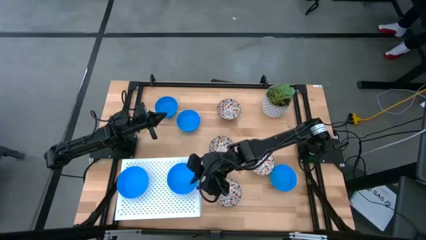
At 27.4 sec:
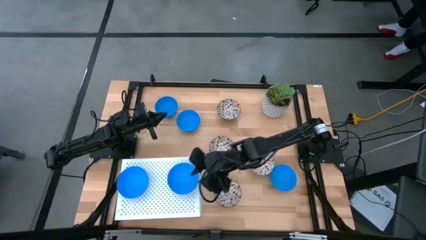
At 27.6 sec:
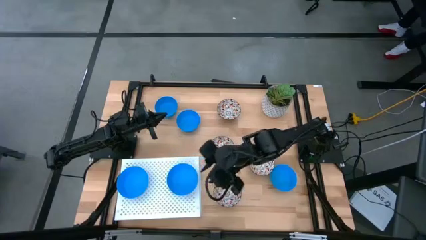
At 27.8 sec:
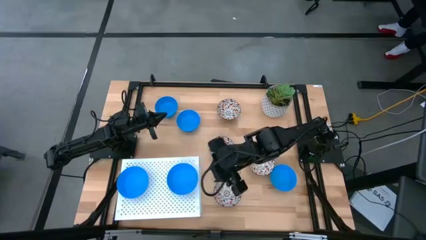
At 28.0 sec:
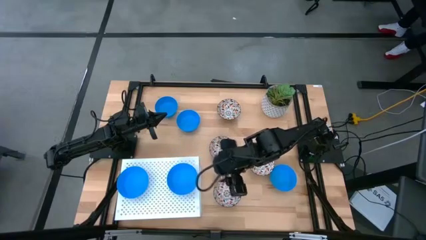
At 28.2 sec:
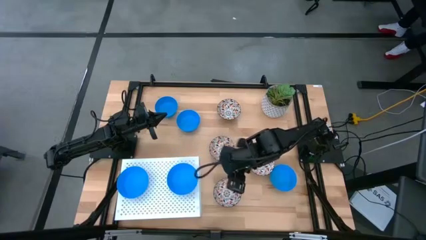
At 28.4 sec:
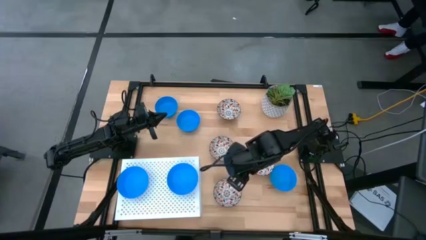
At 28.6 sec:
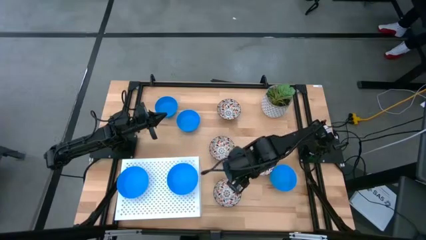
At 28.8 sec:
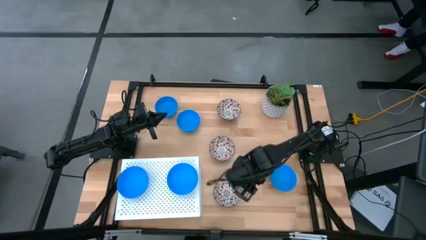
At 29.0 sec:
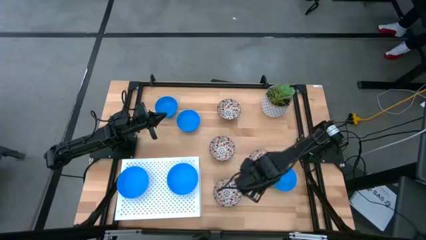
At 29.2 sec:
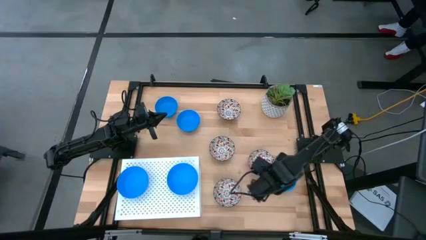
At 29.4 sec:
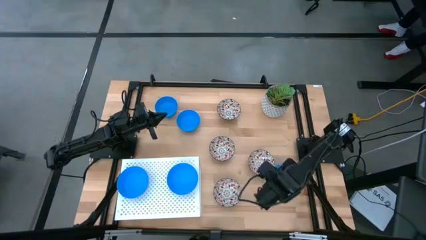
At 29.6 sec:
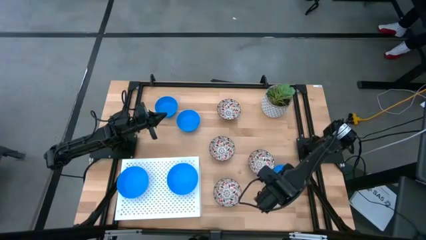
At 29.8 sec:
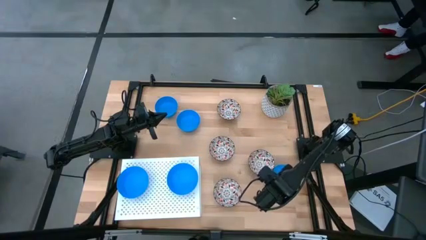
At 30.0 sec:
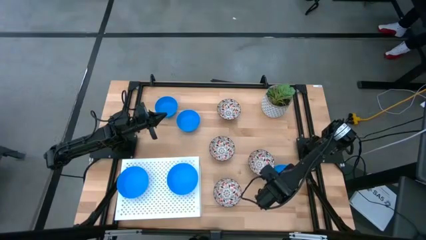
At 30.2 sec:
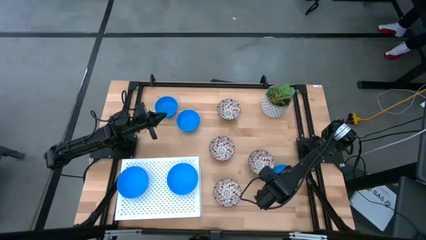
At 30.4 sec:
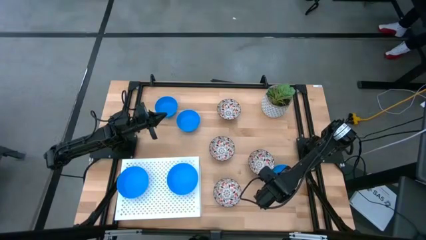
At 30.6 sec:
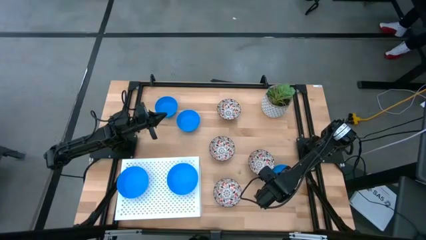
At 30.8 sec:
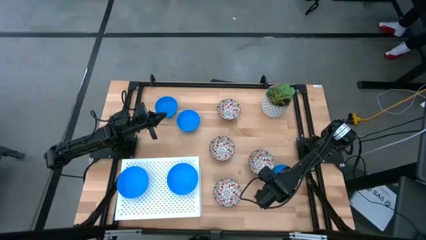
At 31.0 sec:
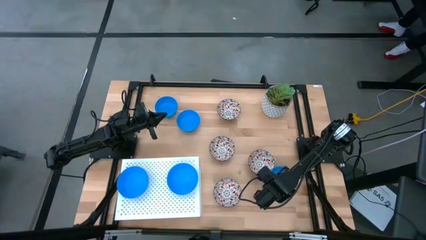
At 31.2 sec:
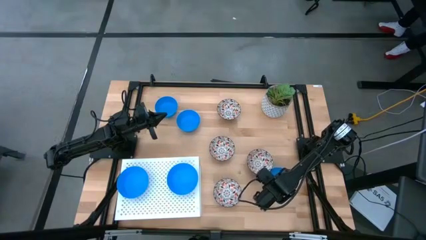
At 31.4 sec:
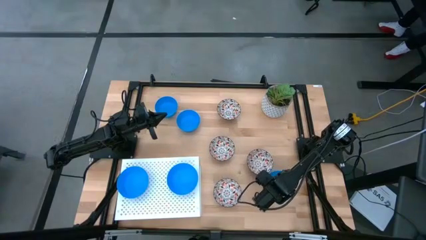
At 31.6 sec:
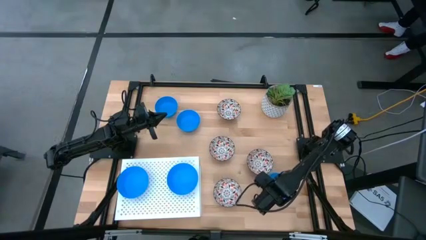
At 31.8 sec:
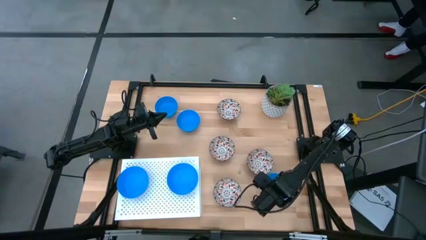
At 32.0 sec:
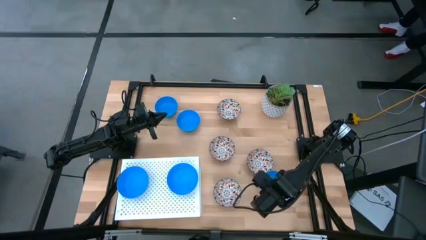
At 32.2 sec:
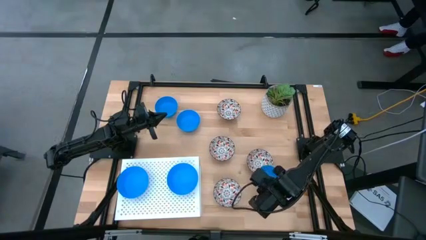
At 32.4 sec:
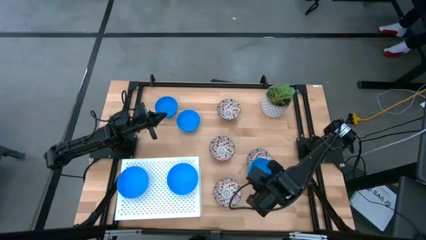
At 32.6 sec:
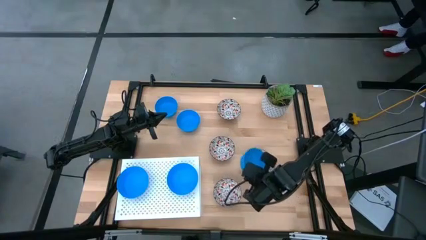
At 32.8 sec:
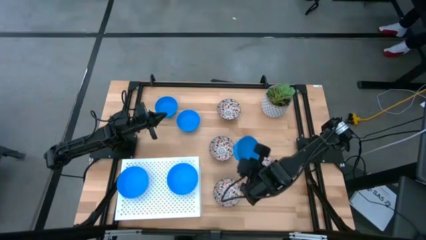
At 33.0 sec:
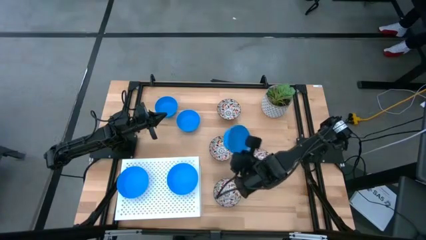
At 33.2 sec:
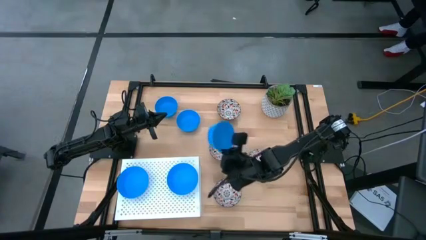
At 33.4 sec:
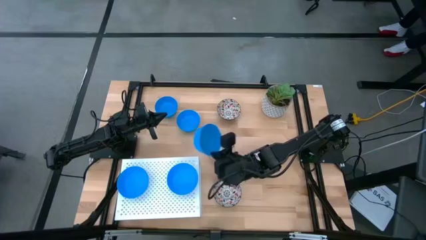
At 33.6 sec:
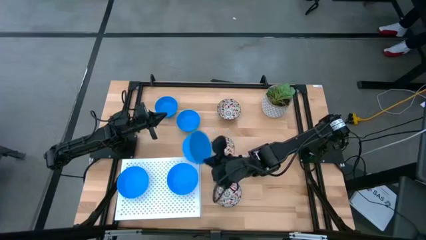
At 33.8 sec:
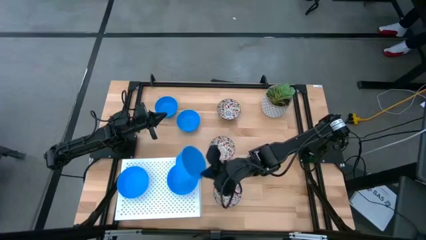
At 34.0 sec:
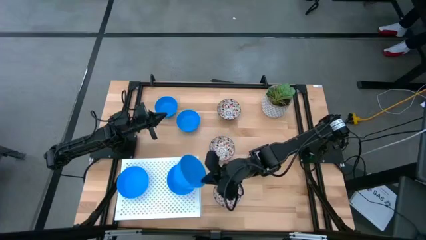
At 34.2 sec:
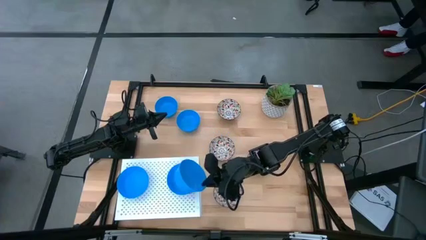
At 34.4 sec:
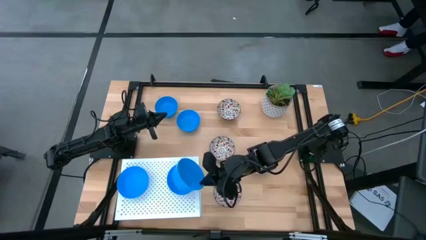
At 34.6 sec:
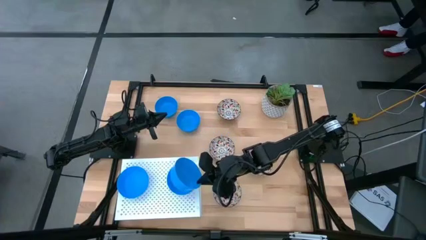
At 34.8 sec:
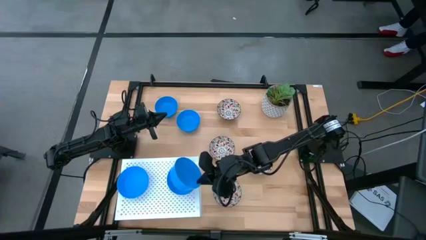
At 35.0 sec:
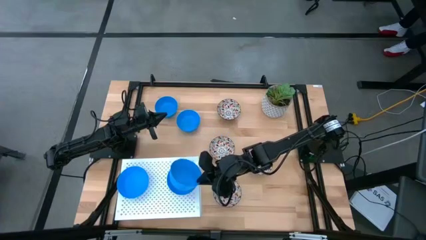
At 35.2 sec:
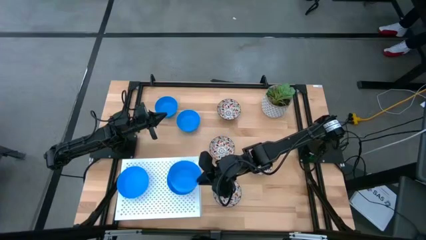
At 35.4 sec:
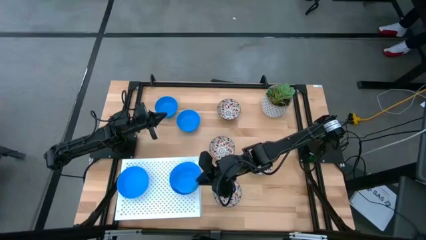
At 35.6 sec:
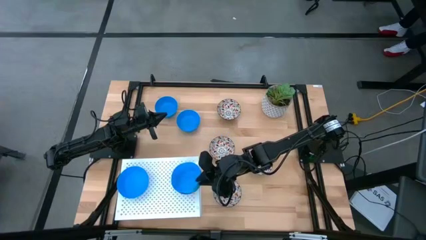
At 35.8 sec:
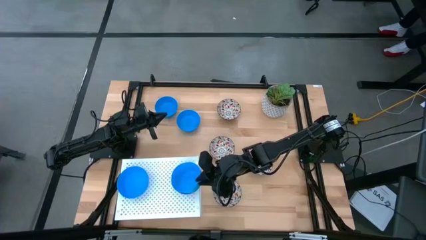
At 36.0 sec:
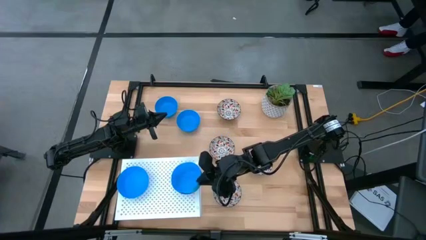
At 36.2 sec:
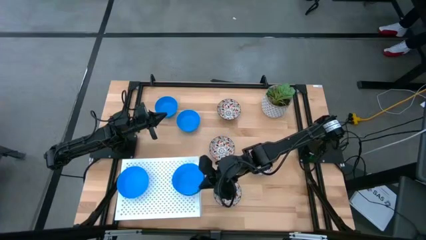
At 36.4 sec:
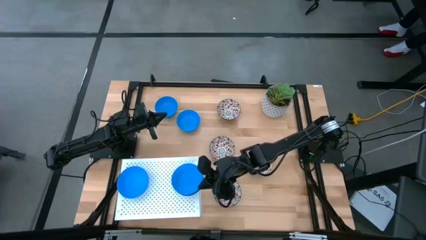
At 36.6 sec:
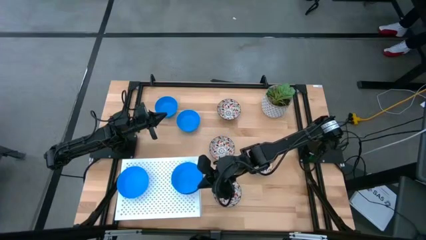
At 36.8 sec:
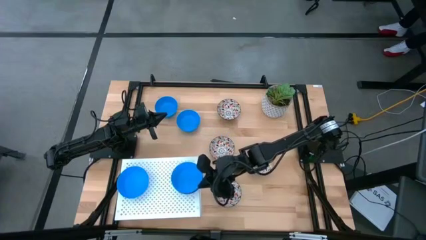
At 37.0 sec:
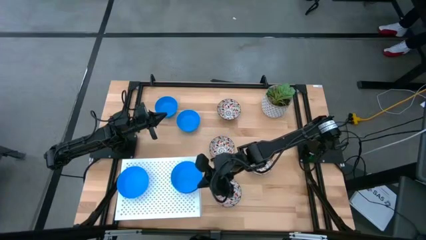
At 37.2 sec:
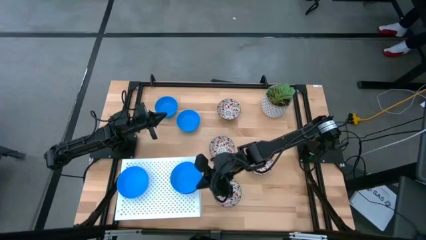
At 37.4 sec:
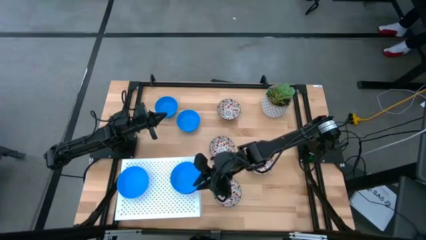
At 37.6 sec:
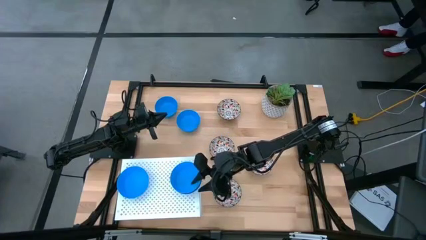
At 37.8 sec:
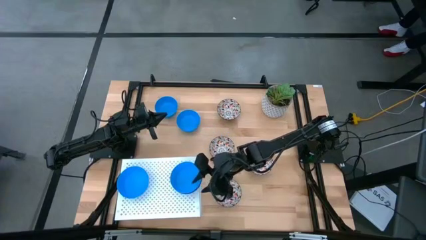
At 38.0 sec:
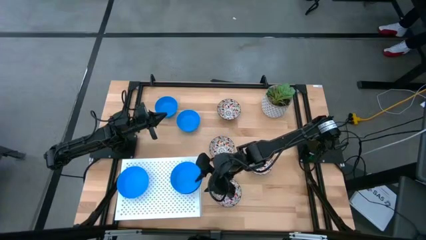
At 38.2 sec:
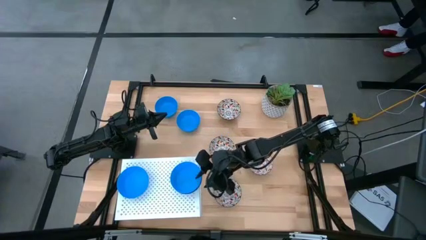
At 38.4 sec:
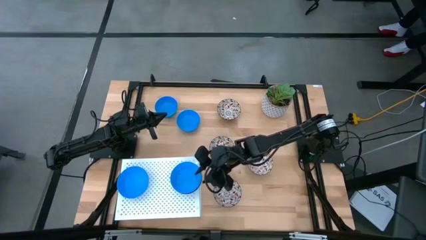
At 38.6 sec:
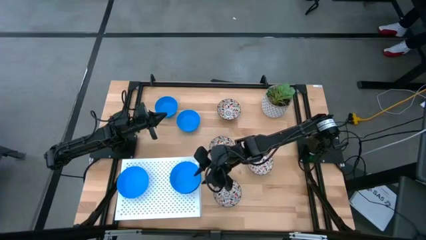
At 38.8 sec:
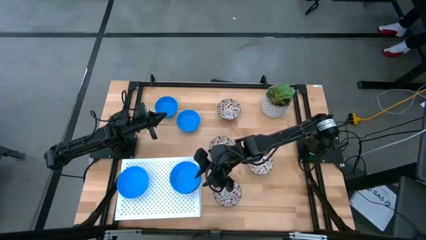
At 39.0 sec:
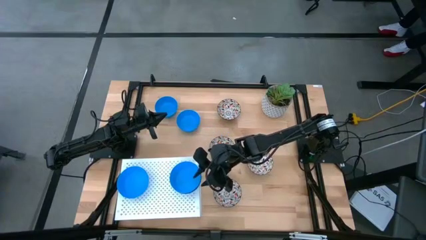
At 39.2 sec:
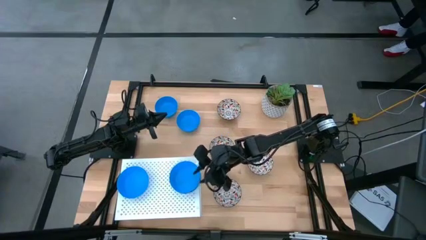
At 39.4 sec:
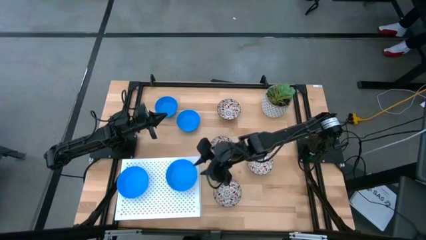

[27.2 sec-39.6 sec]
Task: Pick & Place Mini bowls
Stack the blue bowl on top of the right blue bowl on the shelf

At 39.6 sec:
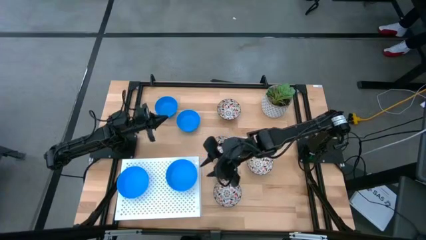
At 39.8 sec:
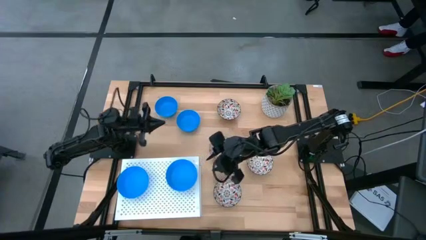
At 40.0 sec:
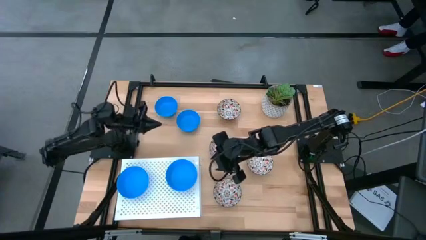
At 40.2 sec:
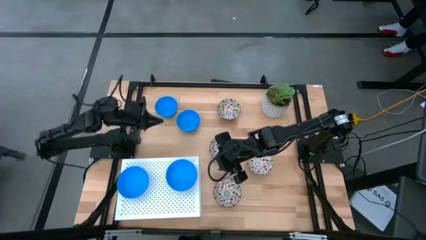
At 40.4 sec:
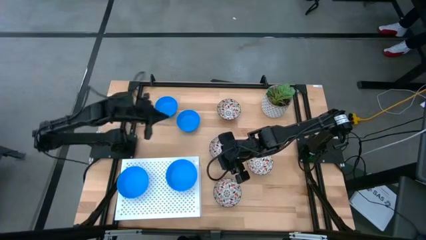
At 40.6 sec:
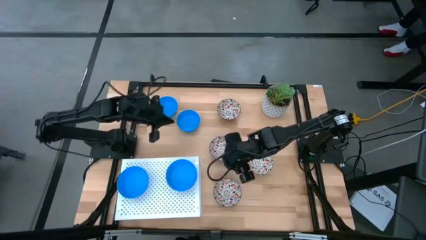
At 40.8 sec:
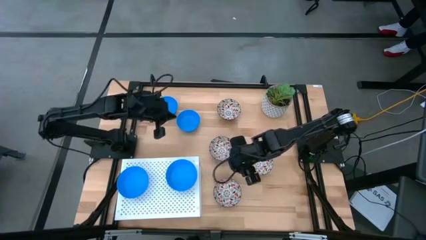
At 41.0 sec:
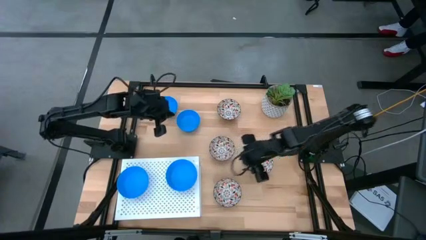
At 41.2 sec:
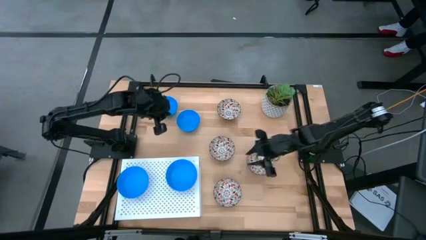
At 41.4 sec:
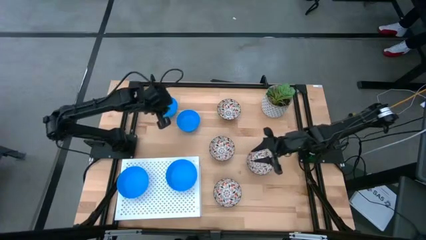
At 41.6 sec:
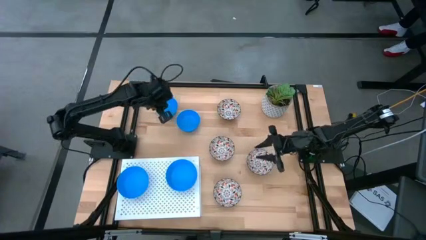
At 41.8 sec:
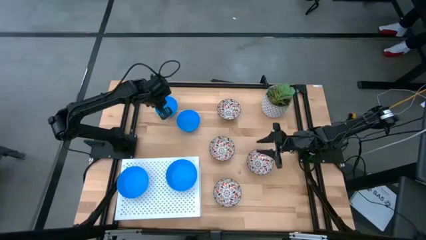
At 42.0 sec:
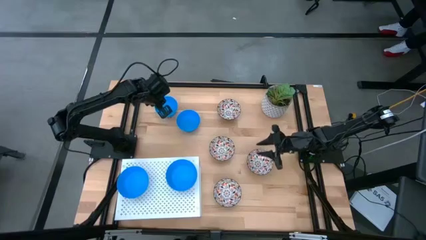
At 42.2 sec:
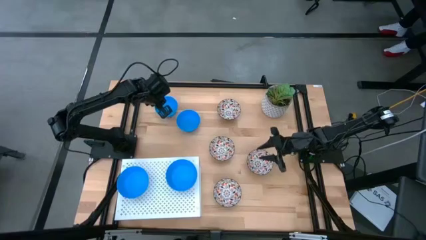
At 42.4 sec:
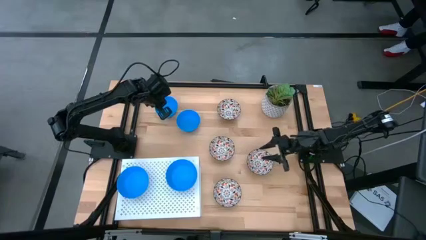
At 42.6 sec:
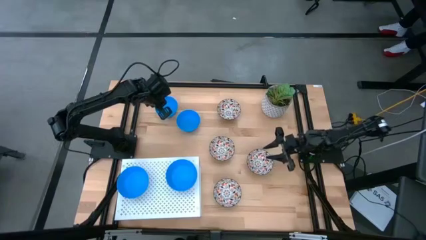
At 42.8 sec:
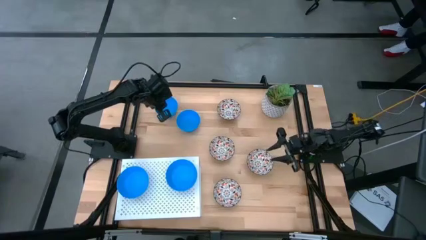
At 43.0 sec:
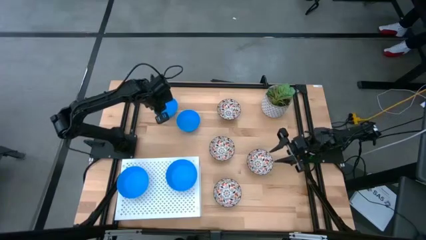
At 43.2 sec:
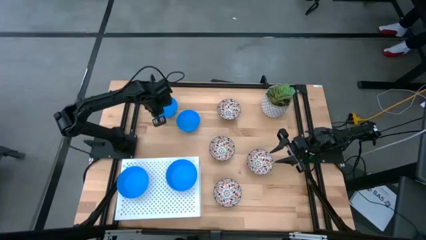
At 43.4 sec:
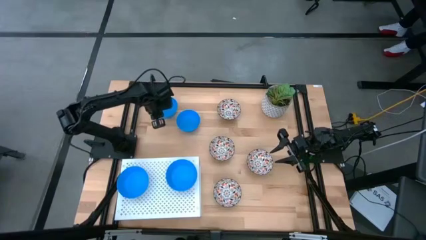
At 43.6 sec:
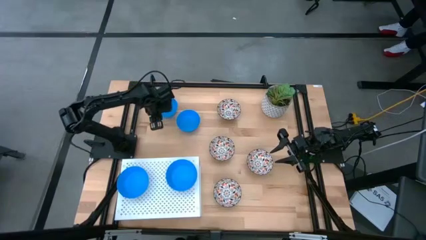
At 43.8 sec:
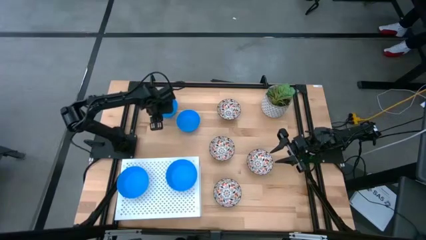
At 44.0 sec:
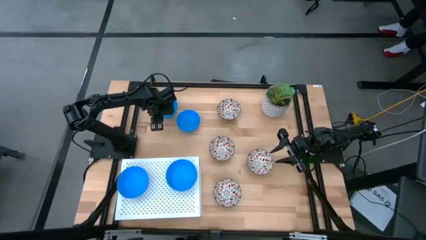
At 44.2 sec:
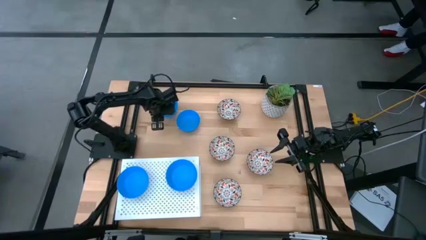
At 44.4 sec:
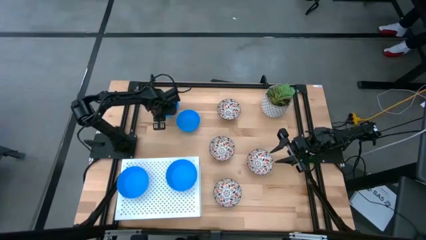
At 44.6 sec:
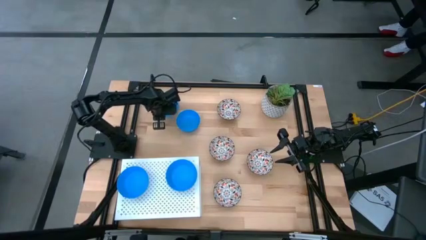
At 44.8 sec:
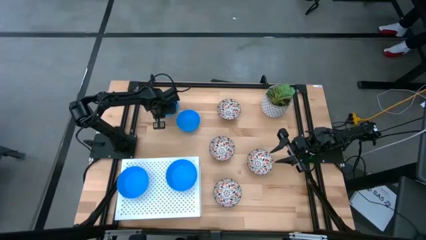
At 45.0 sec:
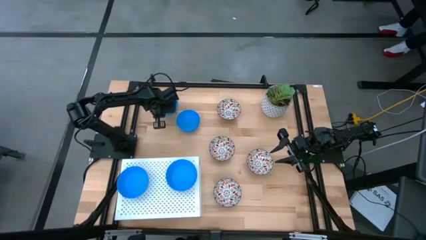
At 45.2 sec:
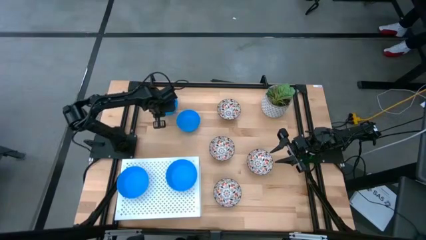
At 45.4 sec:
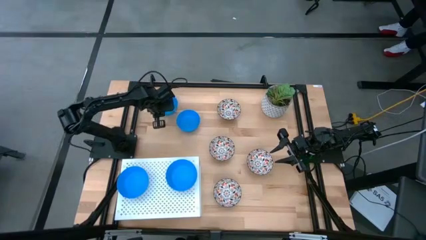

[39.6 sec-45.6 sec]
Stack the blue bowl on top of the left blue bowl on the shelf
